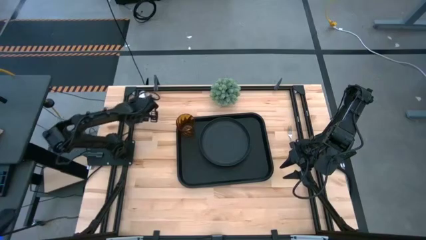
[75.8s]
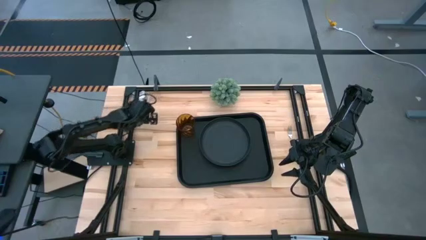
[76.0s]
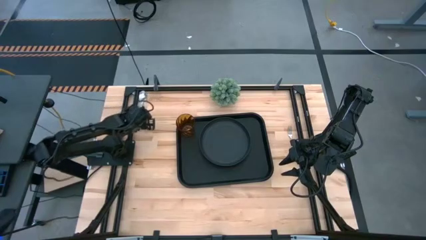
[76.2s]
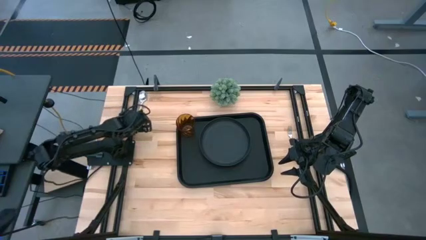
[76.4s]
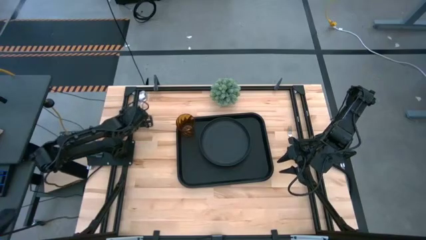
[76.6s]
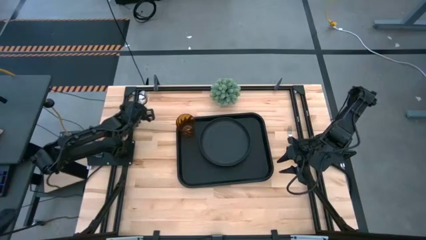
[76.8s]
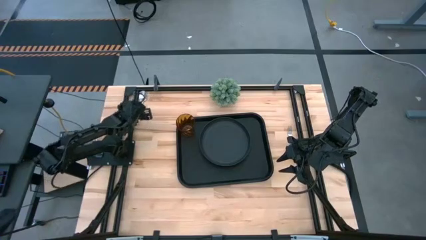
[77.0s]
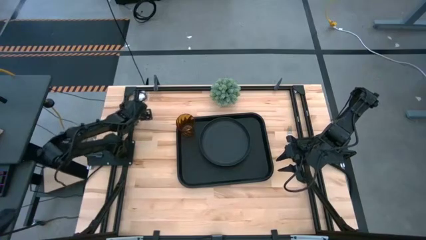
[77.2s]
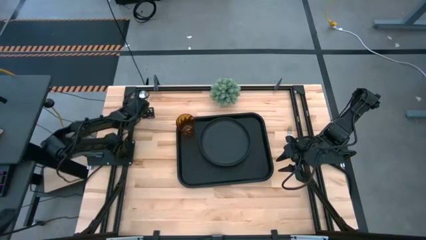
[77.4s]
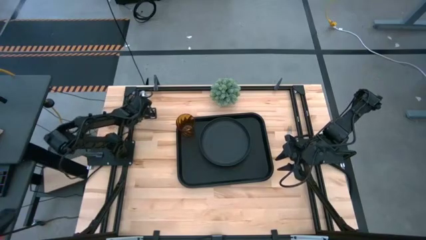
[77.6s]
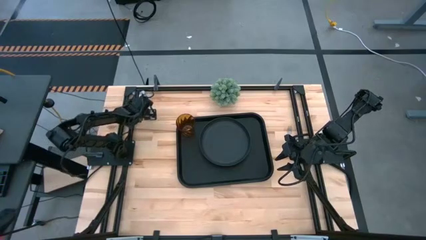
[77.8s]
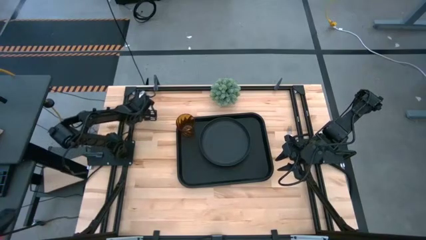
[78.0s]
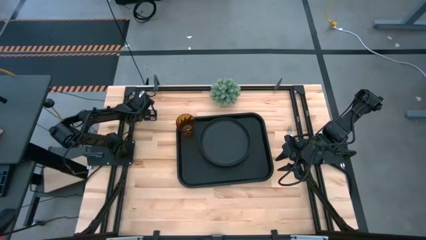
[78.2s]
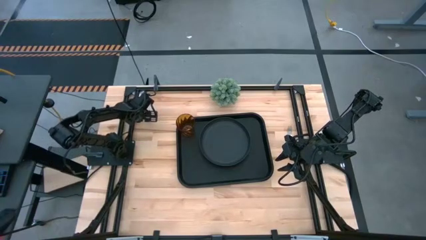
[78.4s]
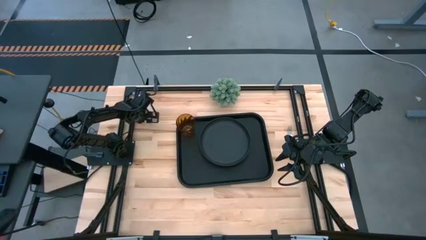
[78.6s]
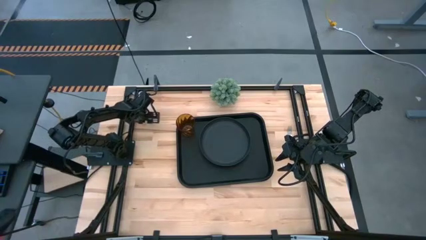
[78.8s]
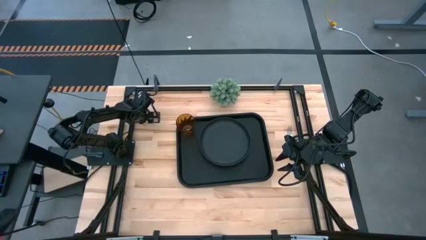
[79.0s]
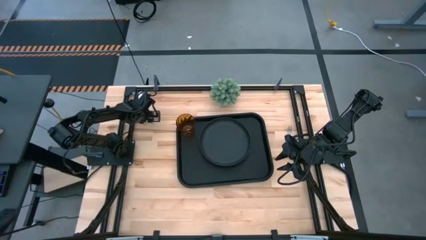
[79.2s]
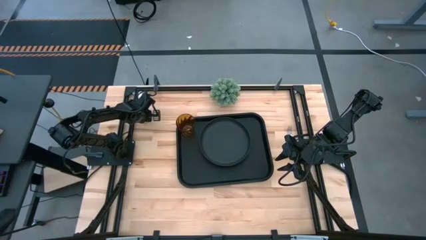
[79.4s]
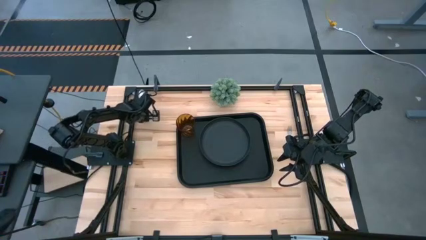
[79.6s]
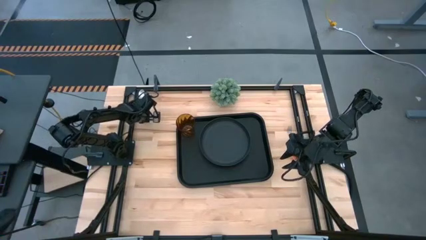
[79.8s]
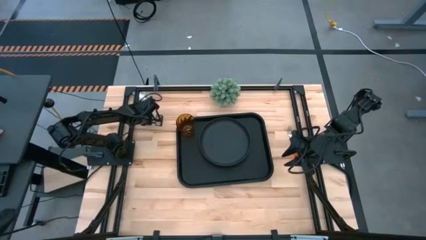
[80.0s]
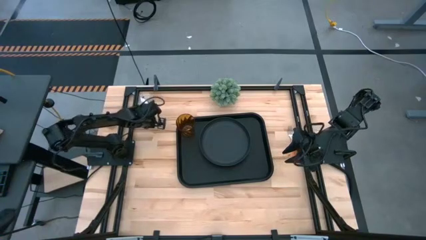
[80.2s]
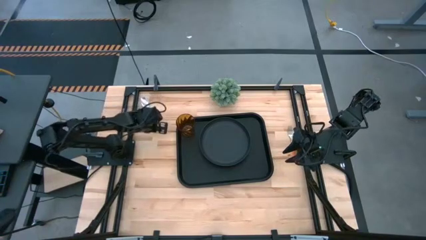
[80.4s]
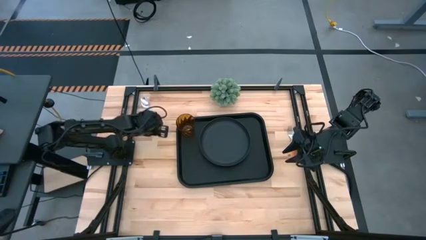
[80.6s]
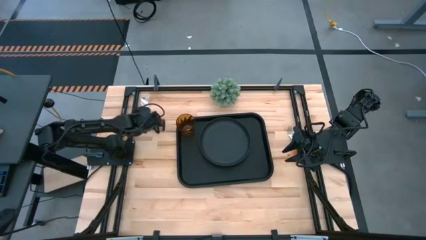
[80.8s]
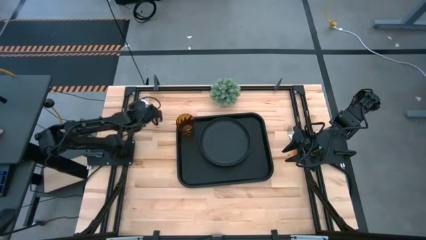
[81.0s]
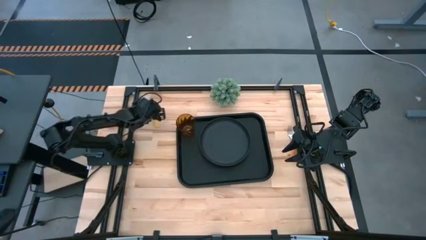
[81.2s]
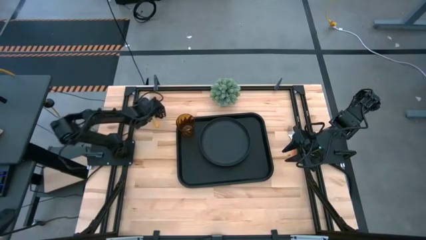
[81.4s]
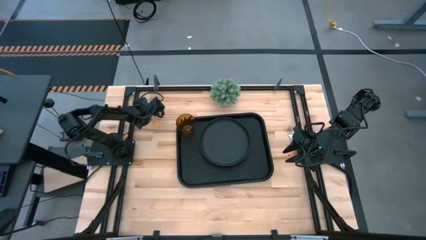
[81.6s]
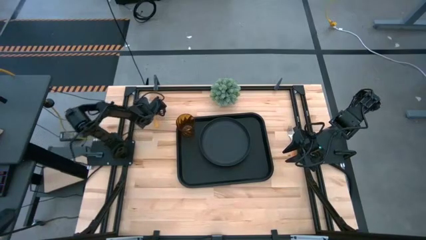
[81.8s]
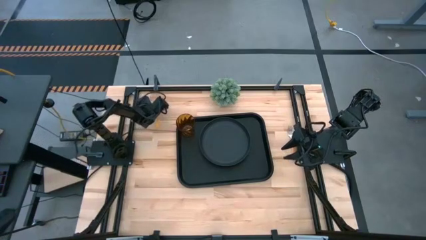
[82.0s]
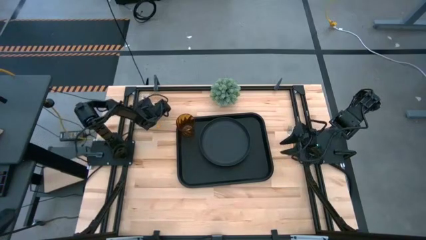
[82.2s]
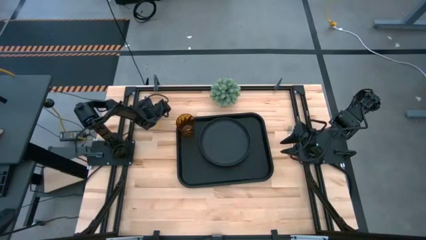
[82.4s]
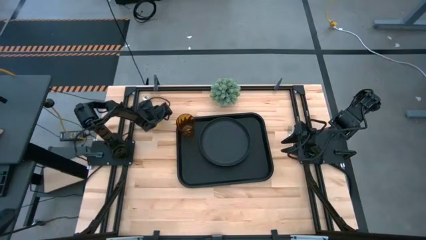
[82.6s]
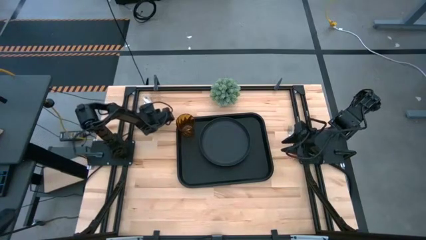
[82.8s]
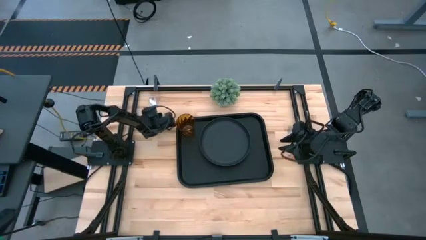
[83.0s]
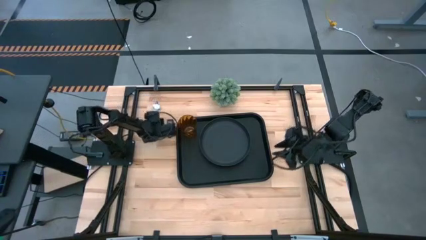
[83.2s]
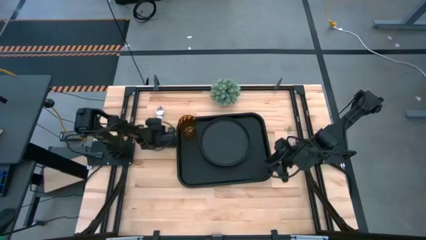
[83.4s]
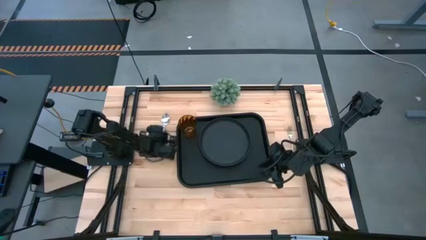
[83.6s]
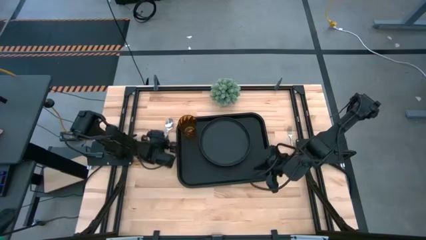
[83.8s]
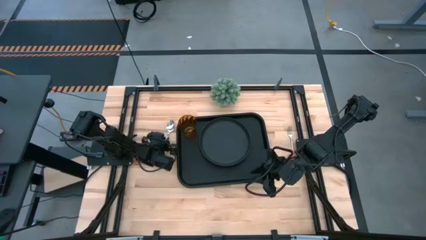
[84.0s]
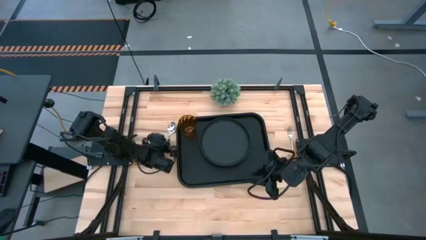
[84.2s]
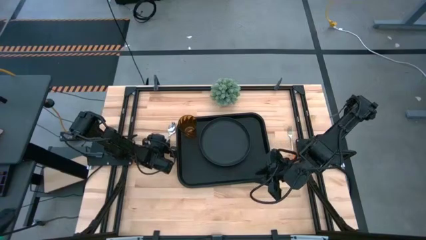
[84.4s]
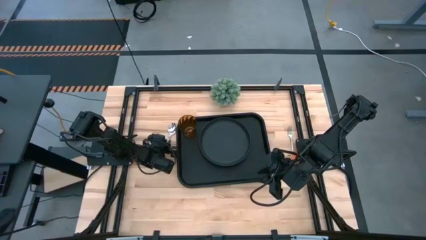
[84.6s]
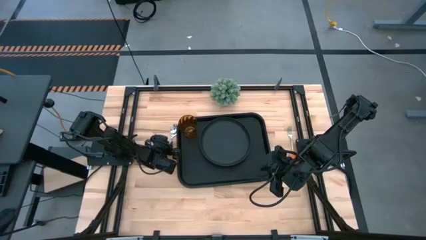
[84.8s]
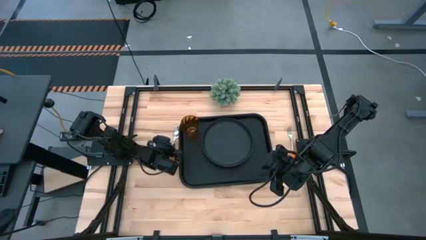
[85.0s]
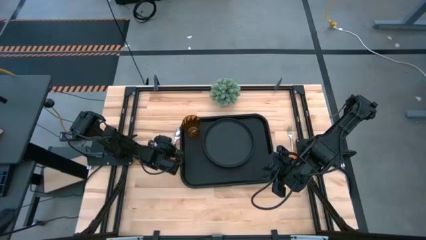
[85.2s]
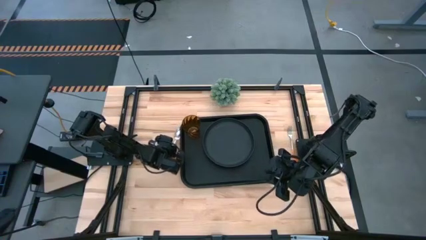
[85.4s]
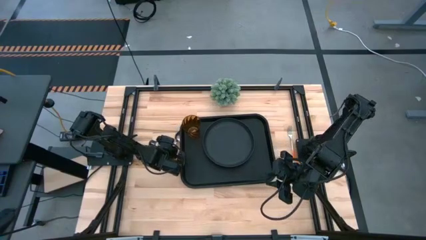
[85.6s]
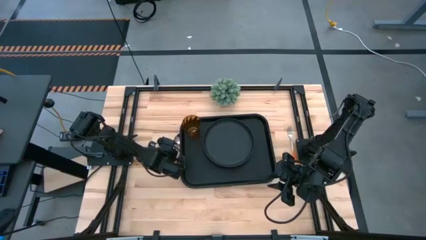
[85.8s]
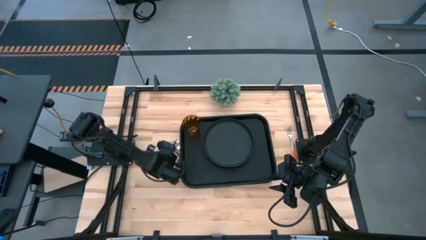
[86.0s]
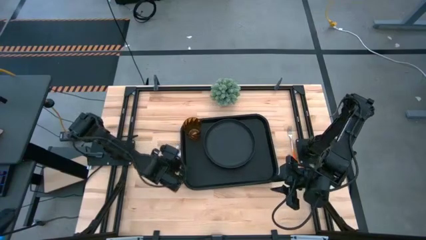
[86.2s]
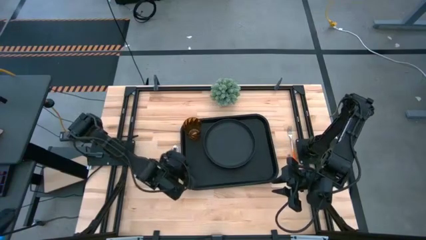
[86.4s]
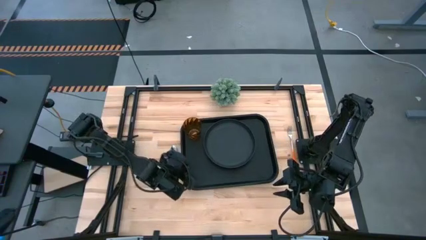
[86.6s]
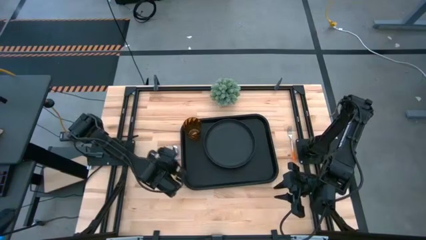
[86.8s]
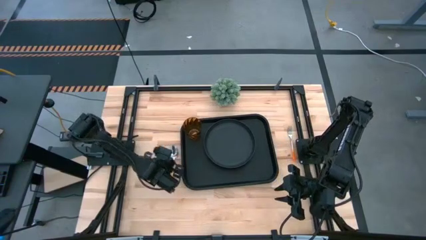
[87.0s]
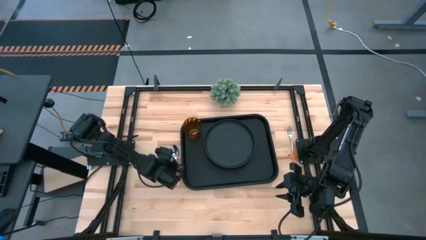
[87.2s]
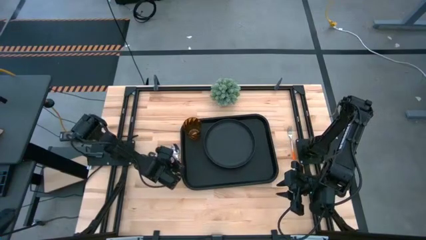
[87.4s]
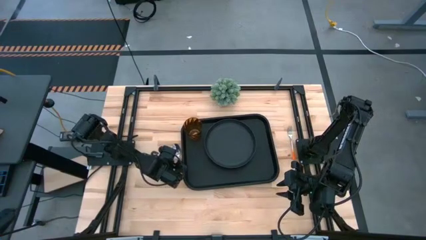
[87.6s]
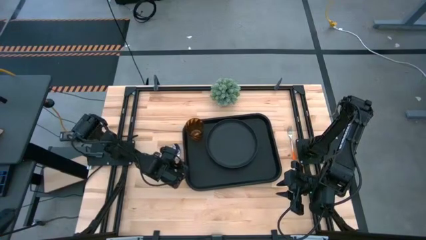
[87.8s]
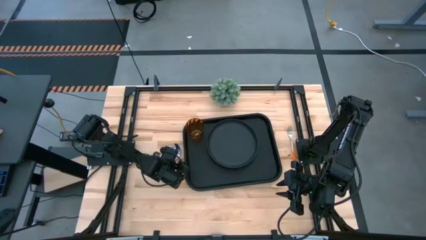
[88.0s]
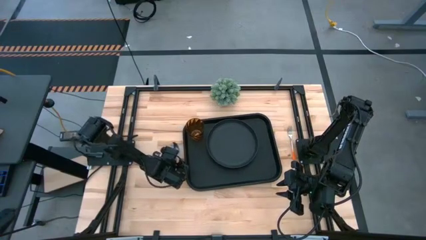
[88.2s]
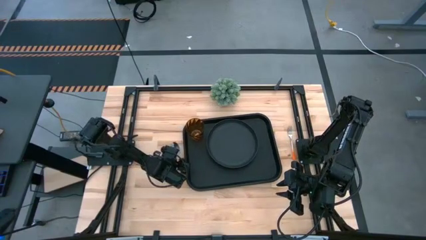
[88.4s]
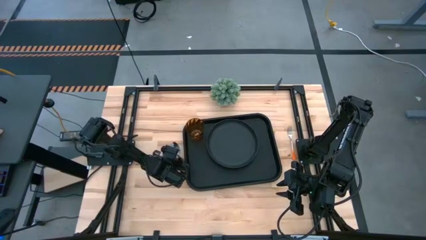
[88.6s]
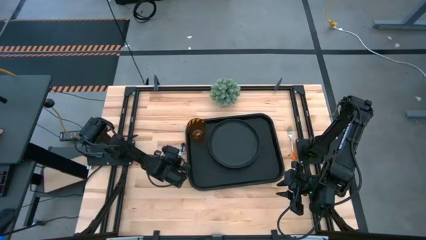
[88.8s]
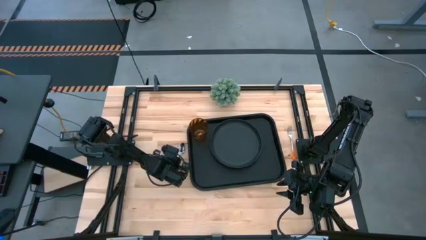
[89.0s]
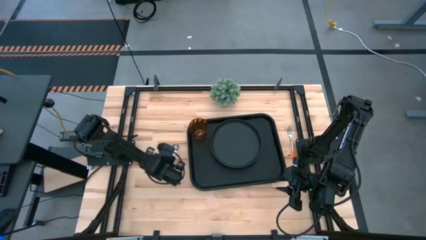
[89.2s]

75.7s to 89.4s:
Task: Pick and place plate/cup/fork/spoon on tray
Put the orange spoon on the black serving tray to the left of the black plate

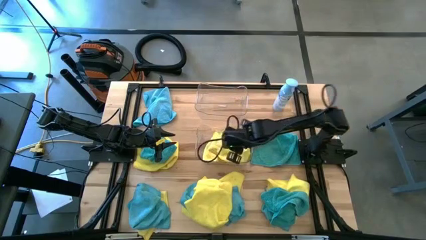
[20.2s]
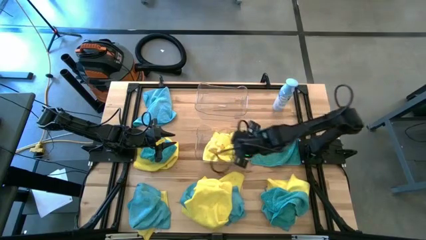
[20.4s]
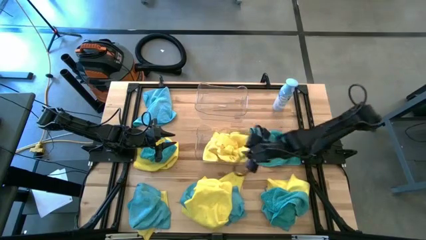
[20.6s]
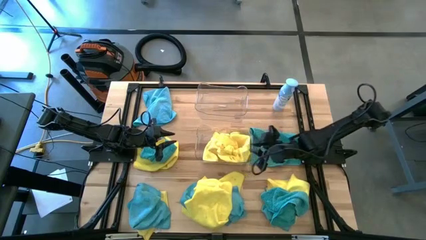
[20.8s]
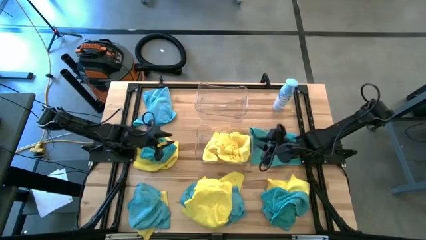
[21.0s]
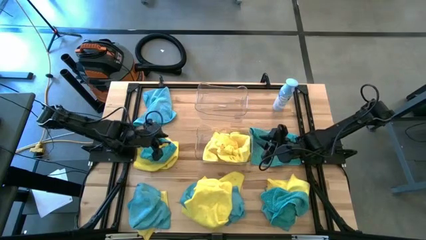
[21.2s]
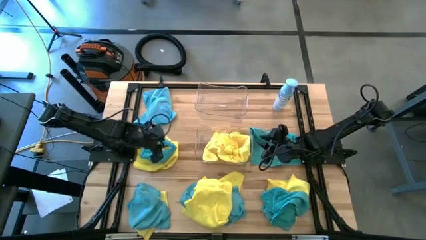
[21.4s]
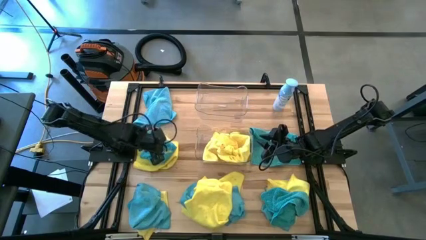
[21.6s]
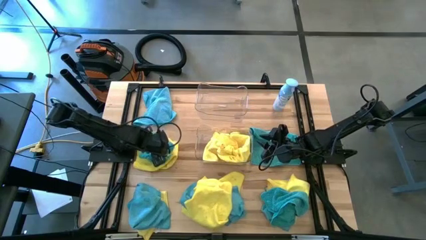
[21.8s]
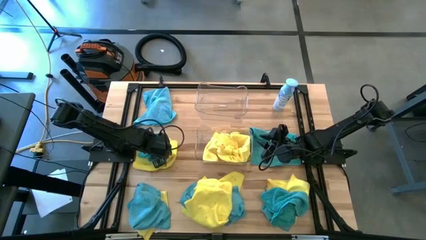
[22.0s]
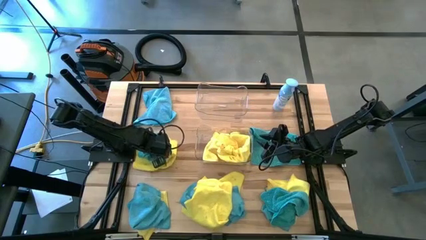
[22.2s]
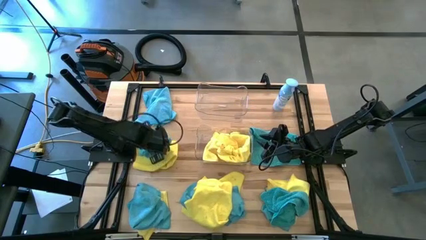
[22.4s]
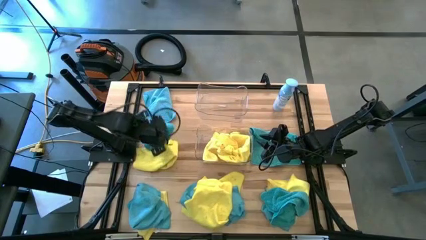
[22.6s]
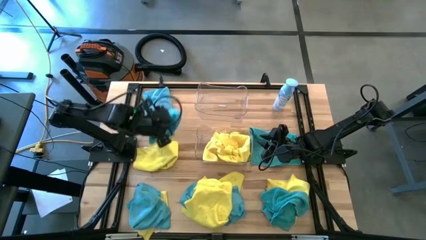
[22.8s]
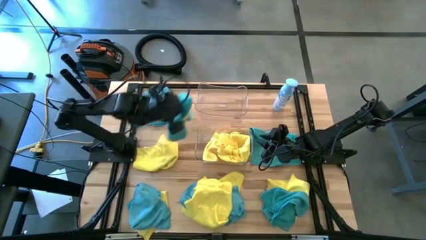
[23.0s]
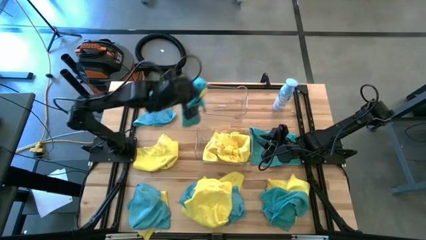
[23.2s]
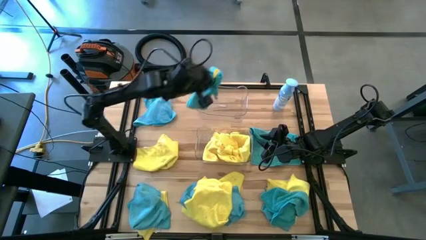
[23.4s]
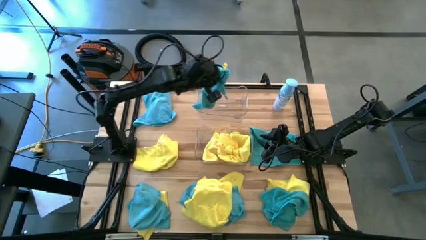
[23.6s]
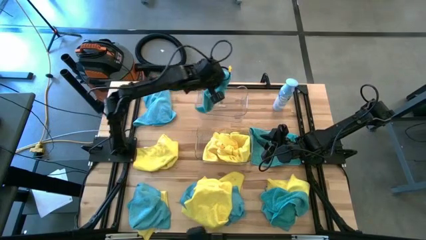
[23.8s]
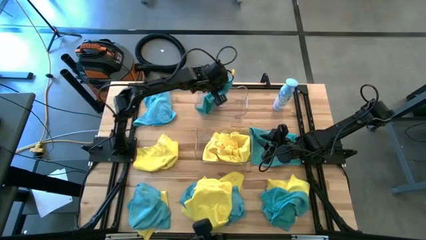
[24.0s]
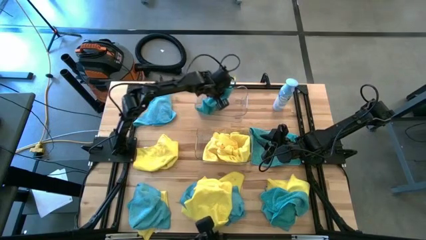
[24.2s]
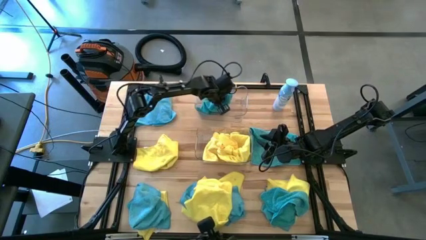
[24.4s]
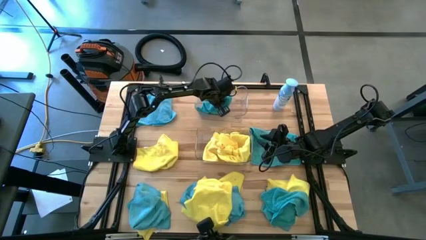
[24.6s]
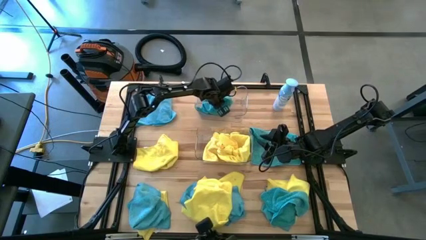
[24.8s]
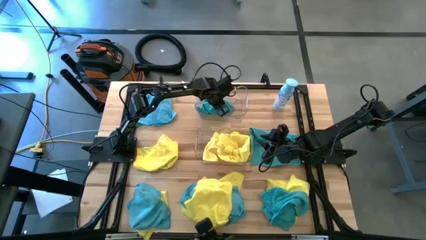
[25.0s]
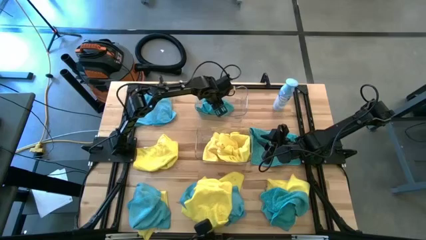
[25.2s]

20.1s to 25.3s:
Task: Sort microfiber towel by color & place in baskets
Put the blue towel into the top transparent bin
